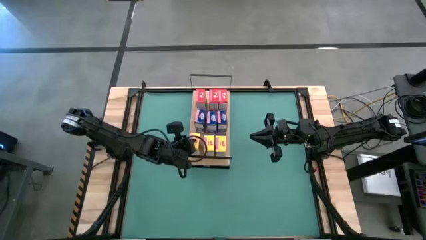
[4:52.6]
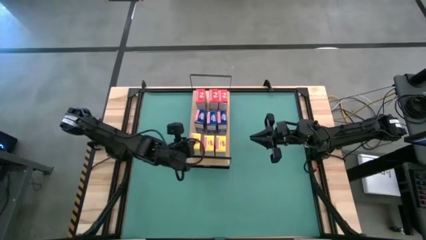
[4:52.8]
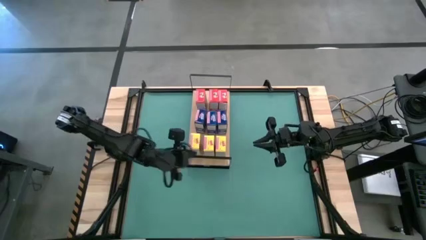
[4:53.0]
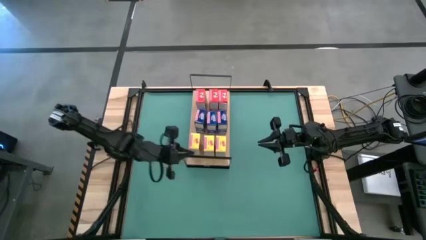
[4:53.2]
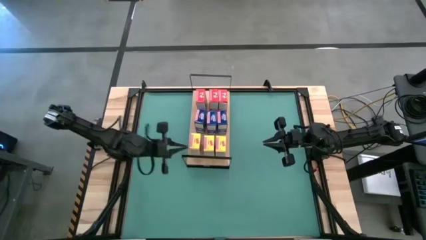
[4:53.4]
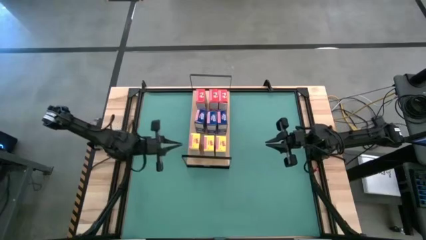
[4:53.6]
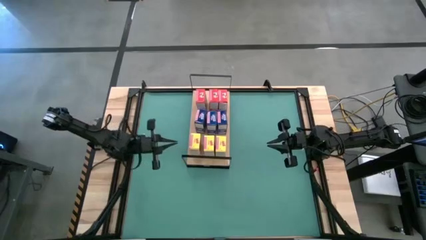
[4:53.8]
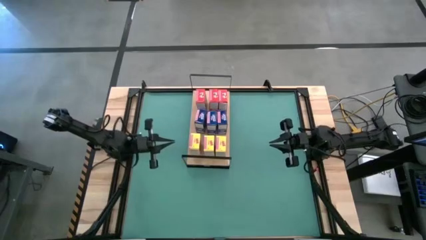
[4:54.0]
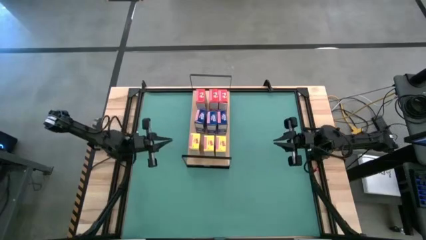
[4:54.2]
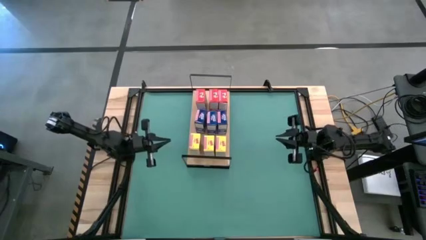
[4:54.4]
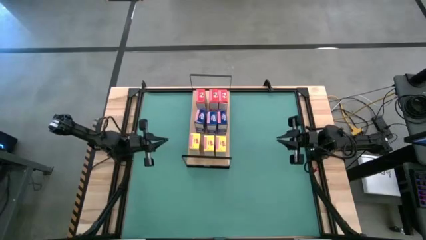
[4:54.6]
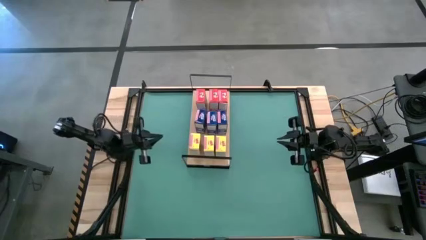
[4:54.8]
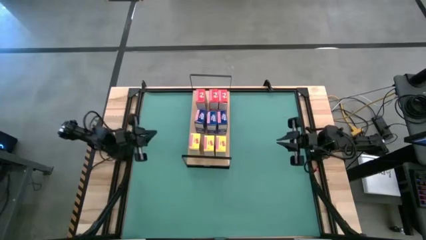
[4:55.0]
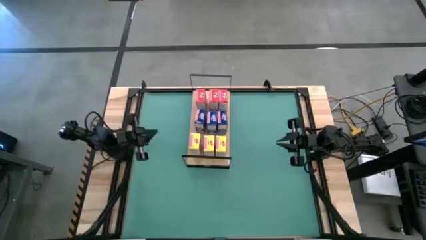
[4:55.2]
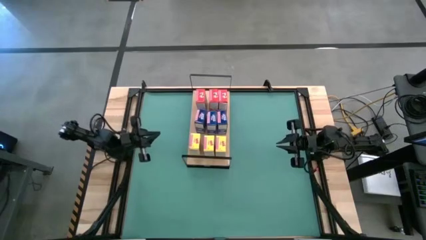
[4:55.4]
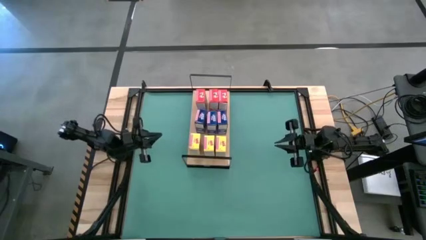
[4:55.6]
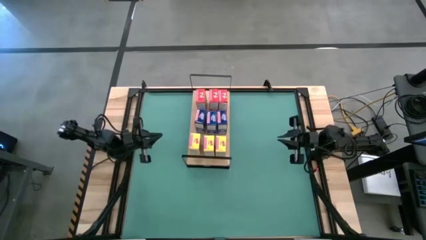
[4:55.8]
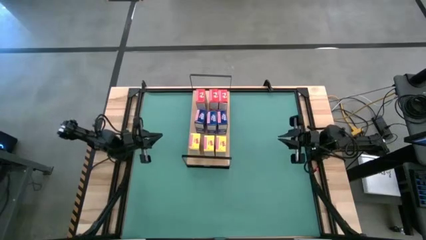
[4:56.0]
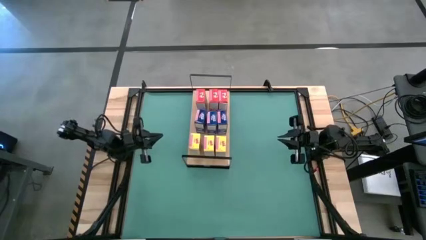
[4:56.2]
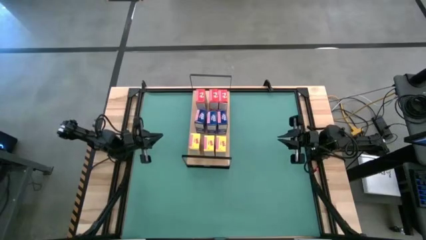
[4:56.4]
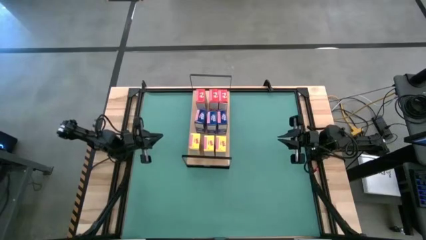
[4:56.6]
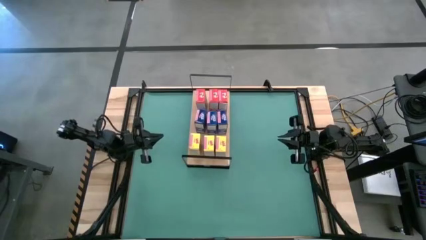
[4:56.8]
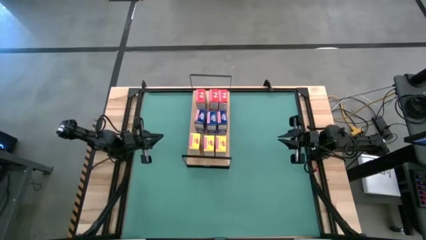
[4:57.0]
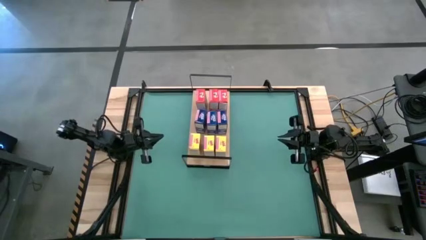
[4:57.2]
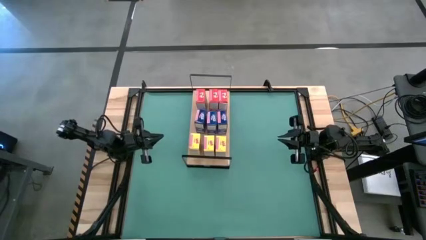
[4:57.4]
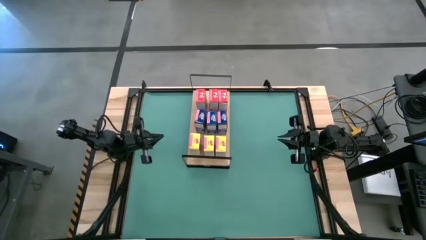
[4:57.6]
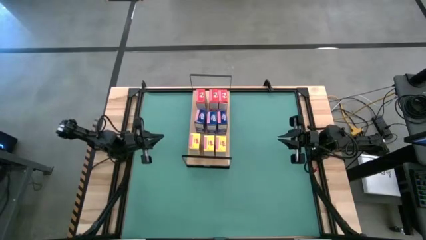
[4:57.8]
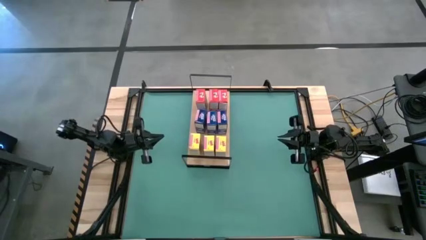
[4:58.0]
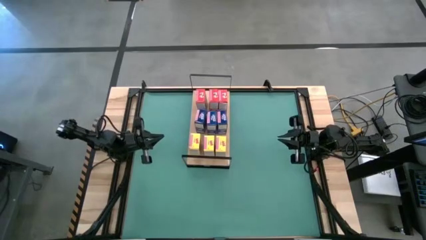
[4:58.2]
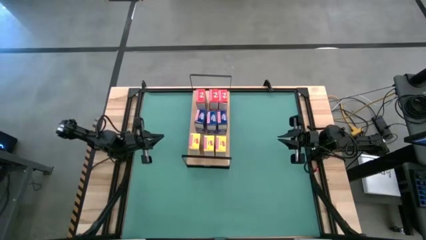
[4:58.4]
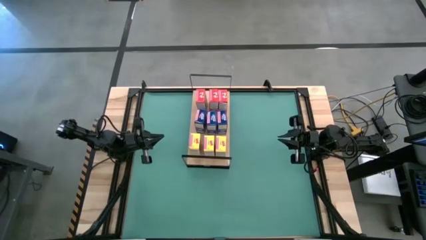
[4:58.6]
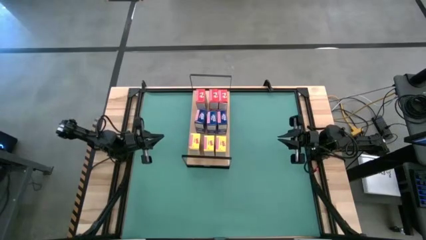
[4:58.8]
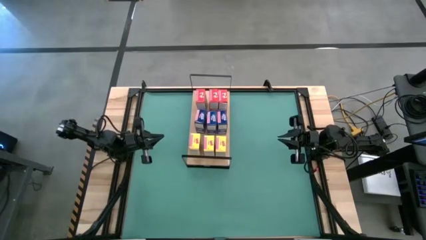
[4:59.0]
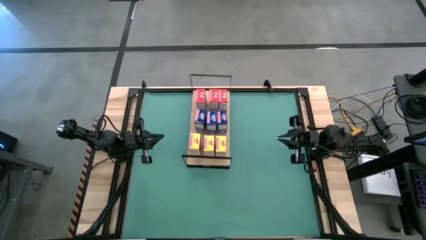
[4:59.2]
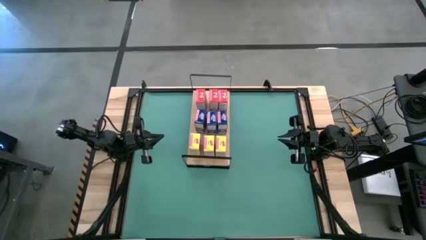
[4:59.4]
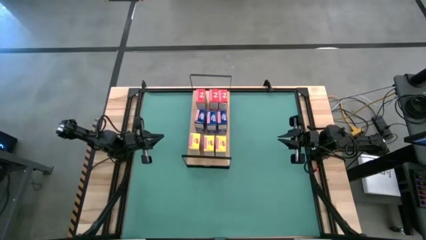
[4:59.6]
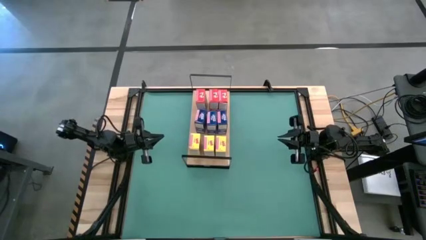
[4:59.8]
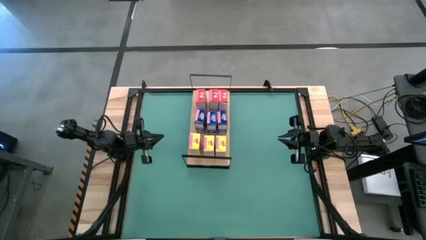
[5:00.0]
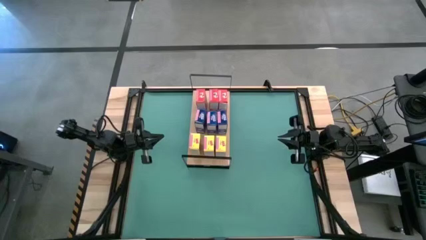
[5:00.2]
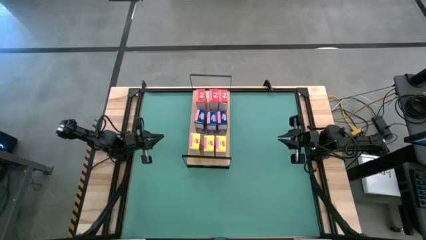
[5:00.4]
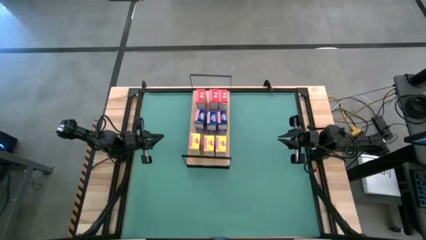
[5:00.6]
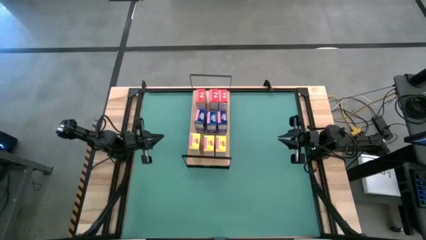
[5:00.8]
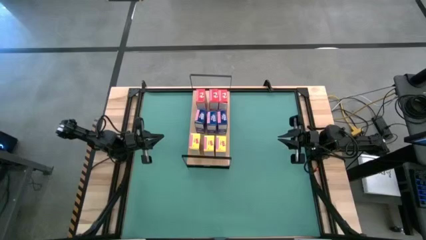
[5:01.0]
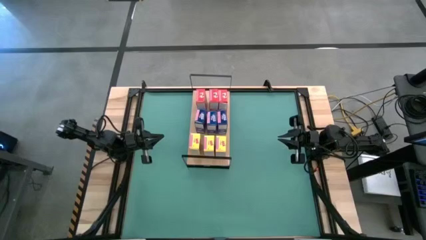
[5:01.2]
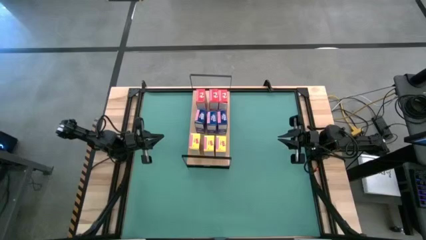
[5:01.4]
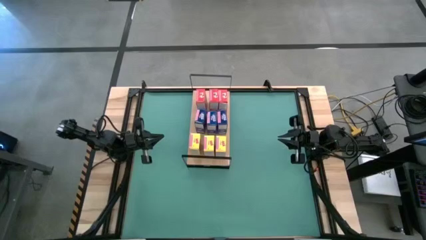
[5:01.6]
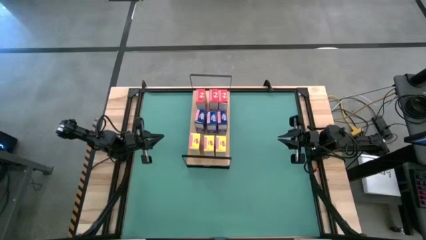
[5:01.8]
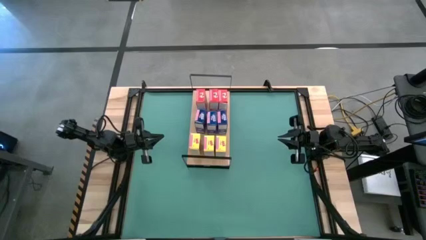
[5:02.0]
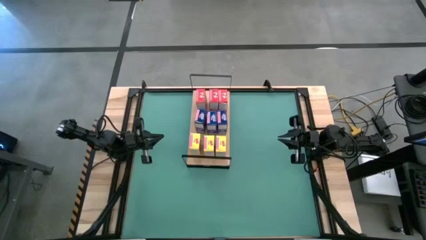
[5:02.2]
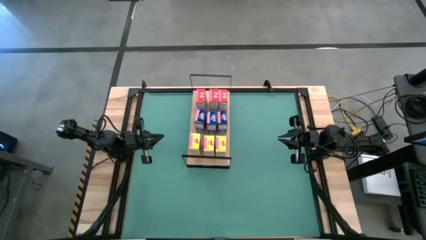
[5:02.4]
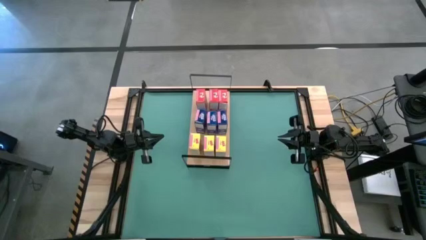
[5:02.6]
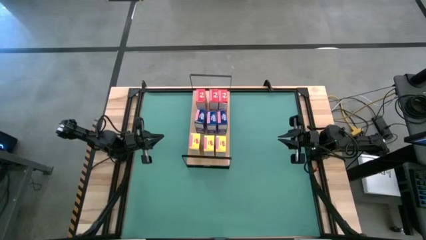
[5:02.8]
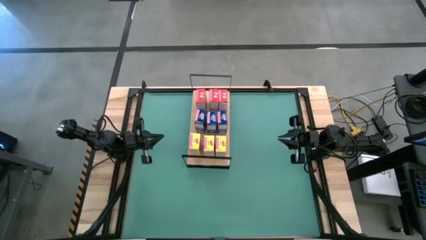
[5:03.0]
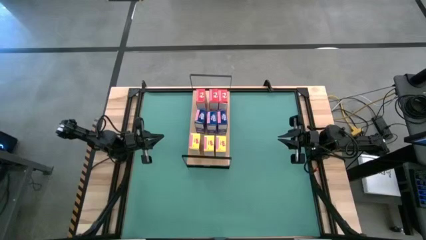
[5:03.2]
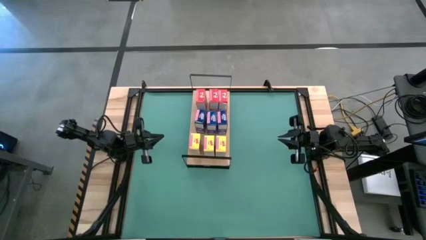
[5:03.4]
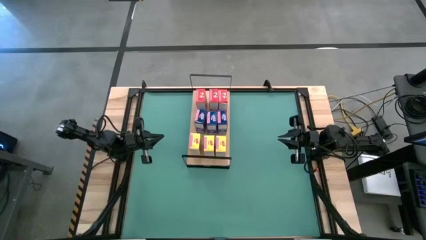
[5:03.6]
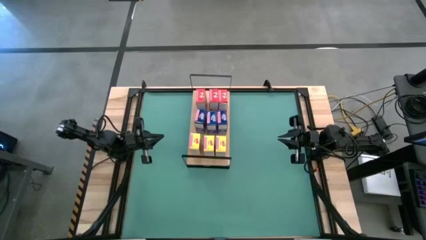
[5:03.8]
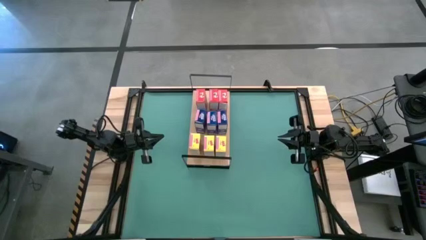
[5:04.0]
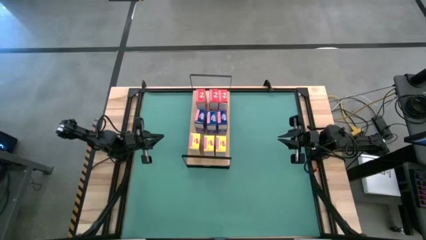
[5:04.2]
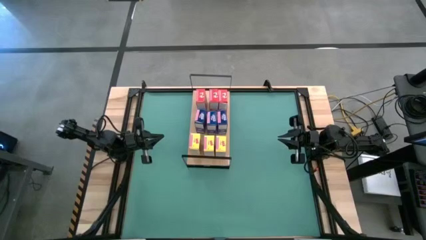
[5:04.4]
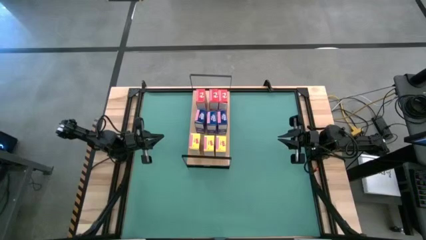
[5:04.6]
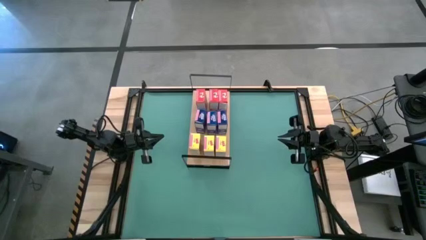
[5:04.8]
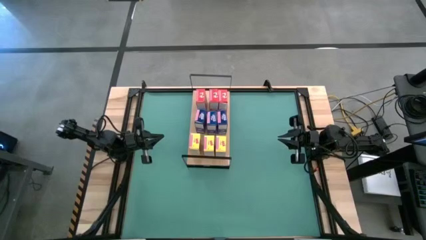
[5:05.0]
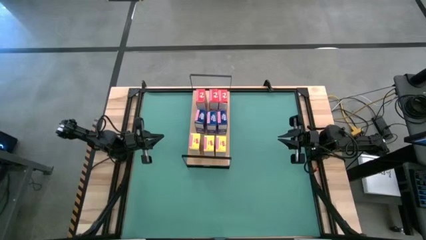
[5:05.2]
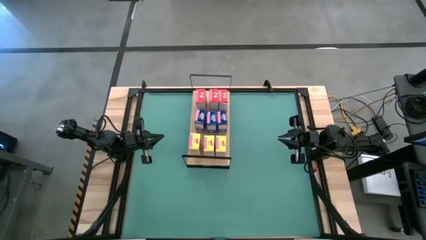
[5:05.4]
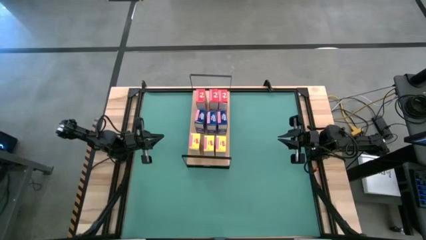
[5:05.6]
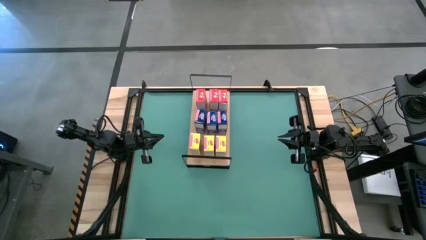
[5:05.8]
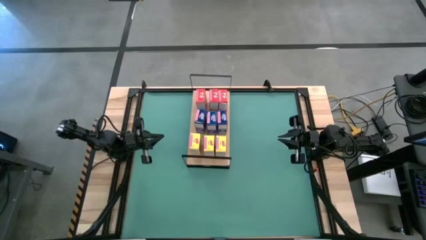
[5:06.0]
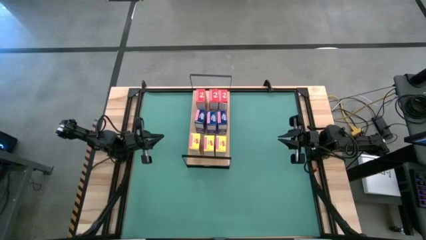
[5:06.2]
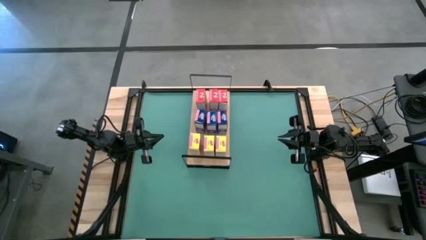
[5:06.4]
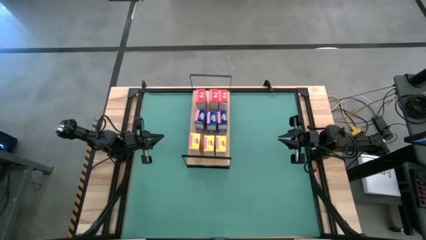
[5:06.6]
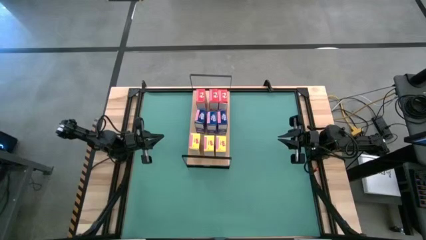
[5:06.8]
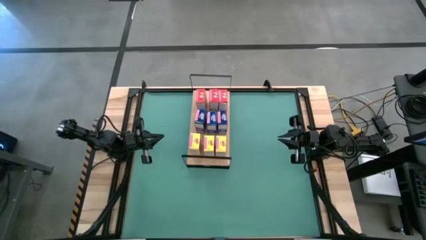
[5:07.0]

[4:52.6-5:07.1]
Task: Stack cereal on shelf
Return to Home Position

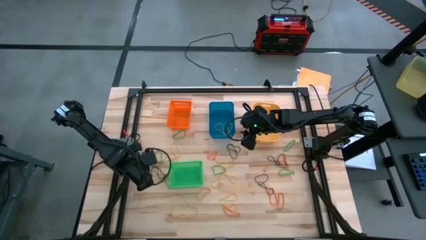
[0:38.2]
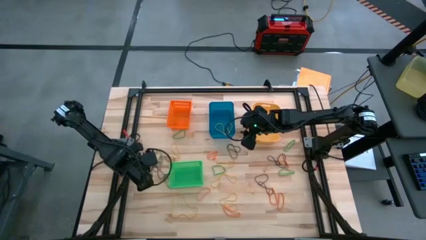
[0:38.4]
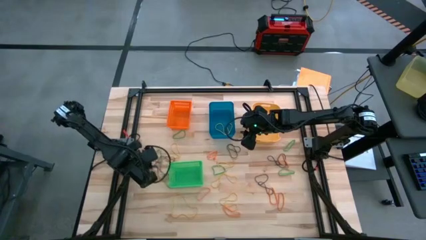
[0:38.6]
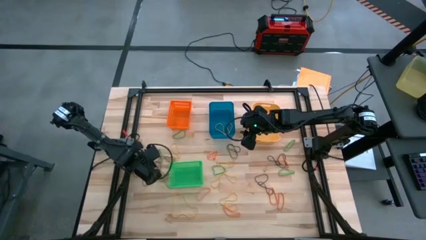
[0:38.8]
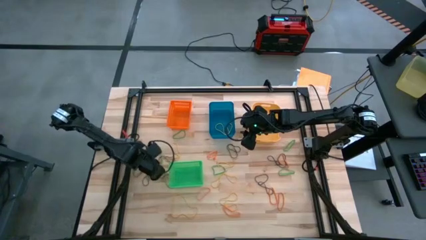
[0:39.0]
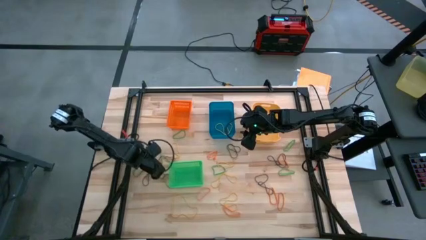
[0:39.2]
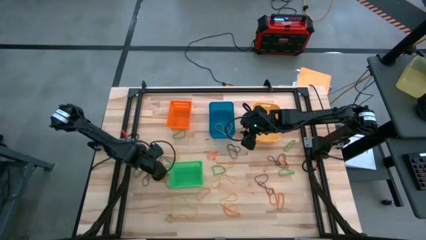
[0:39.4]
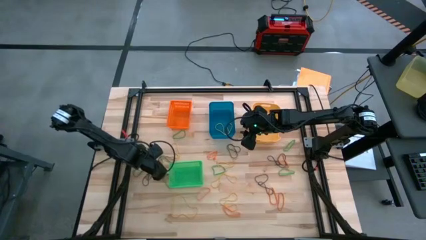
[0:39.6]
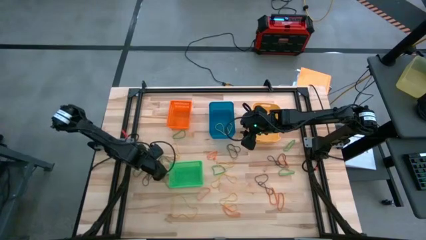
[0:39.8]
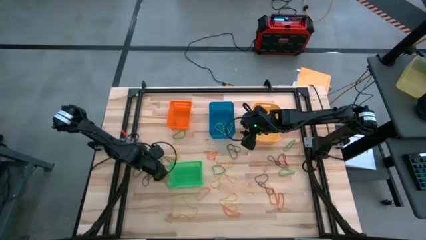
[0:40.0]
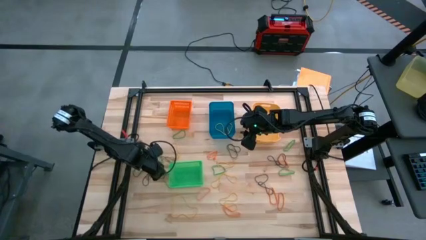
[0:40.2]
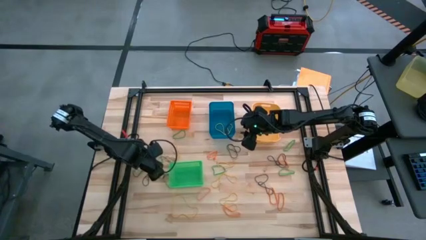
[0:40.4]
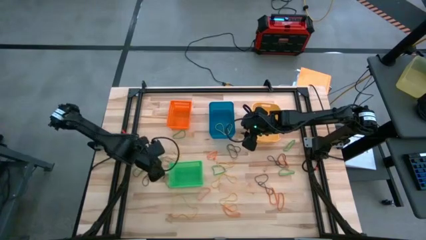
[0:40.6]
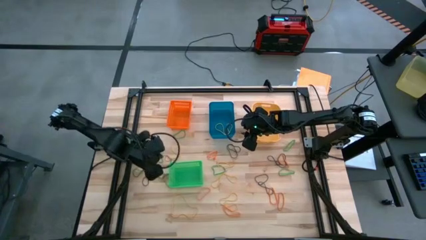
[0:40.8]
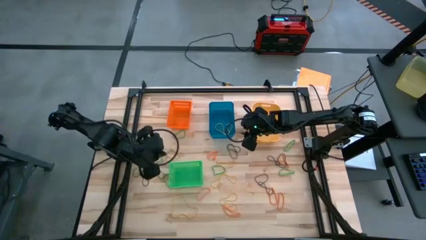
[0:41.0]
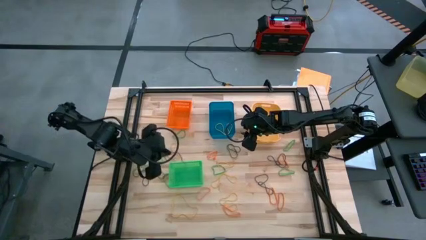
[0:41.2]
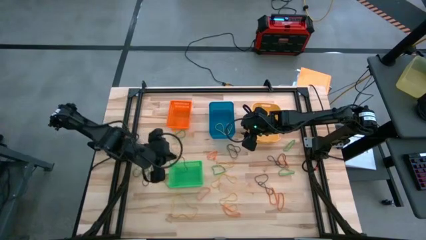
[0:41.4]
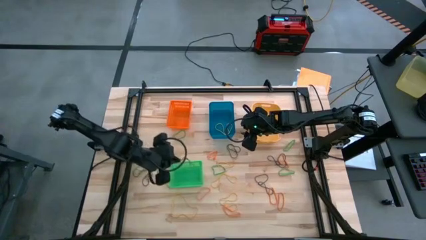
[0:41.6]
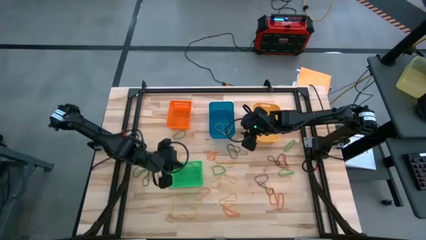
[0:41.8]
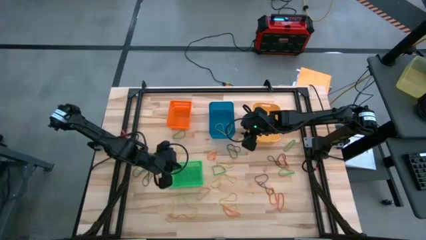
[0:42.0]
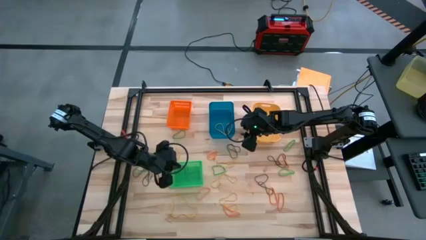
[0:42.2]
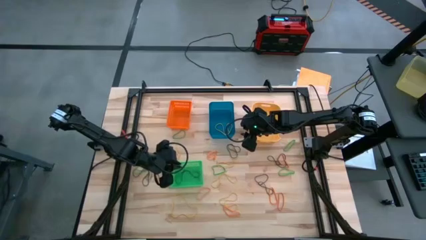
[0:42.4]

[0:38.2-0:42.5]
Task: Sort rubber bands into baskets
Put the violet rubberband into the green bin
